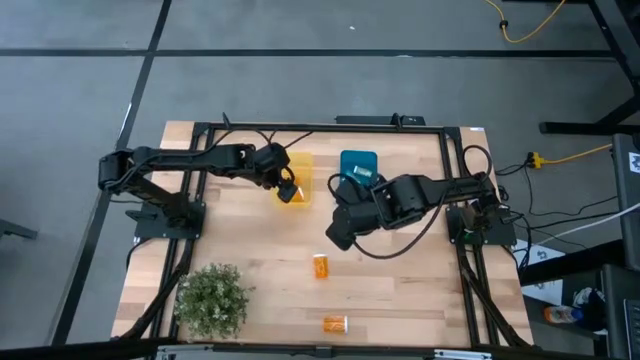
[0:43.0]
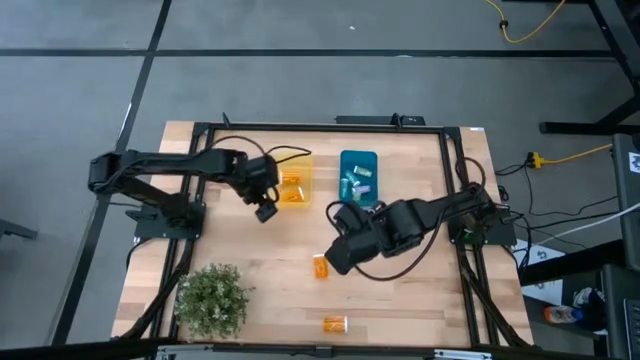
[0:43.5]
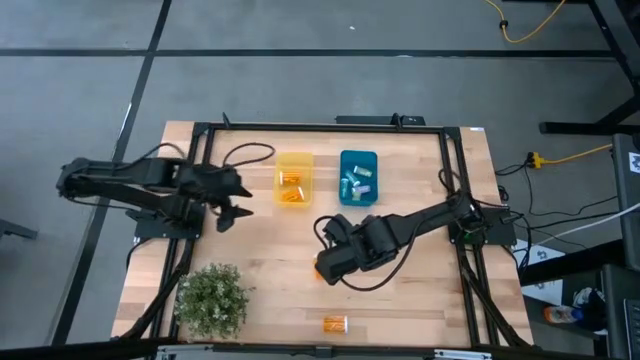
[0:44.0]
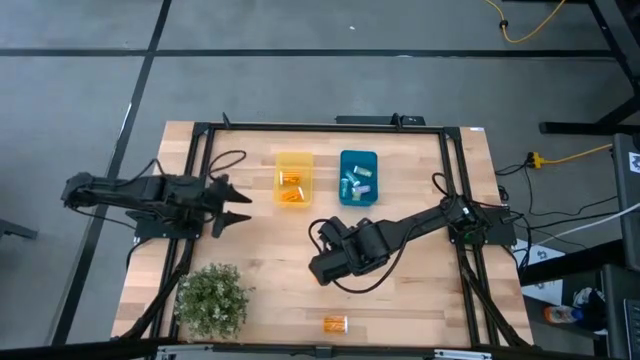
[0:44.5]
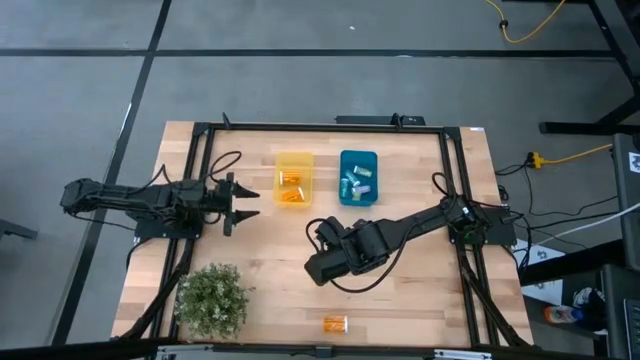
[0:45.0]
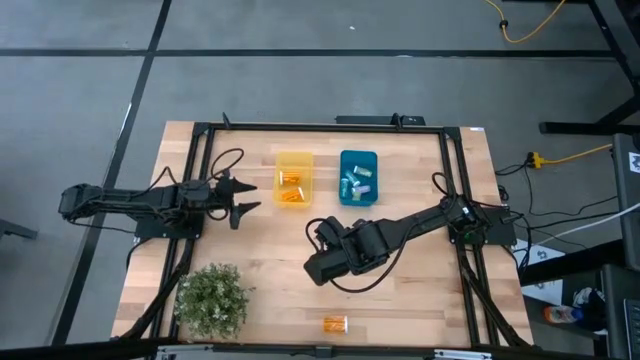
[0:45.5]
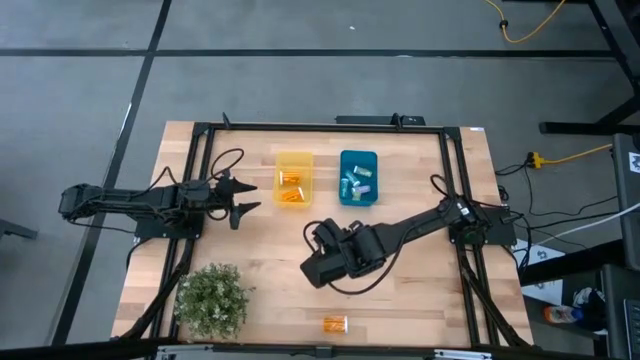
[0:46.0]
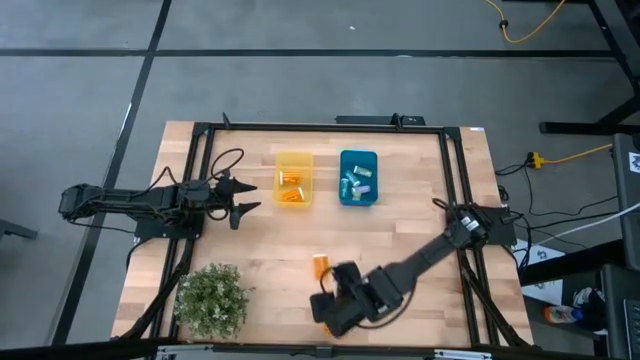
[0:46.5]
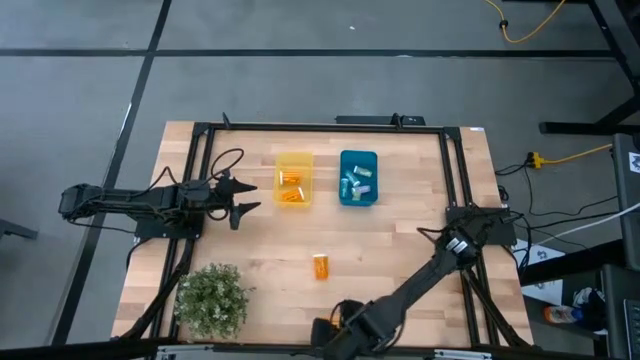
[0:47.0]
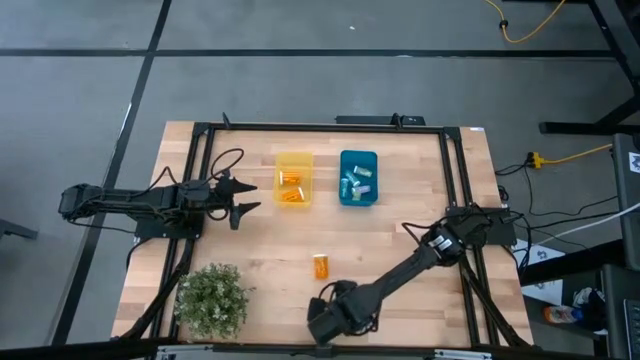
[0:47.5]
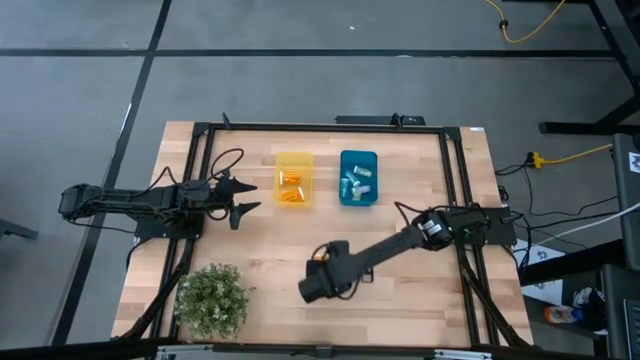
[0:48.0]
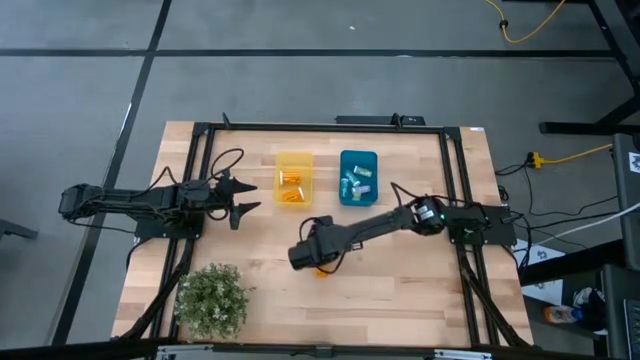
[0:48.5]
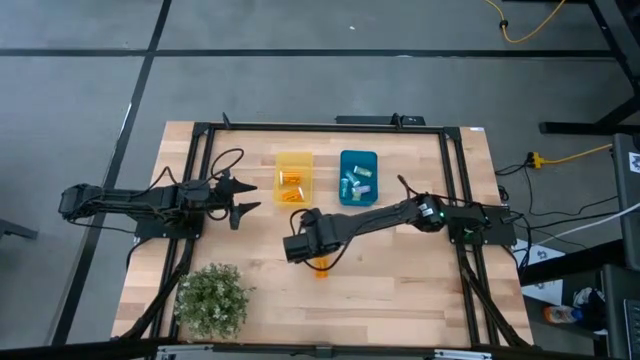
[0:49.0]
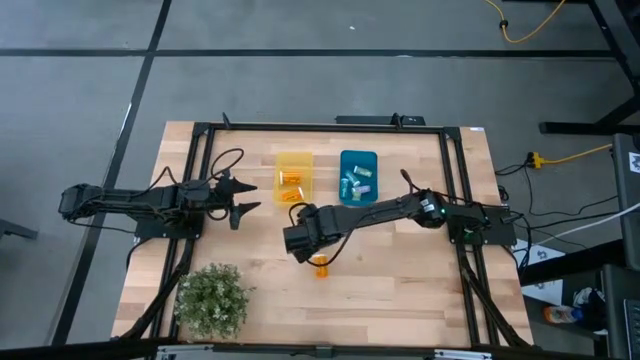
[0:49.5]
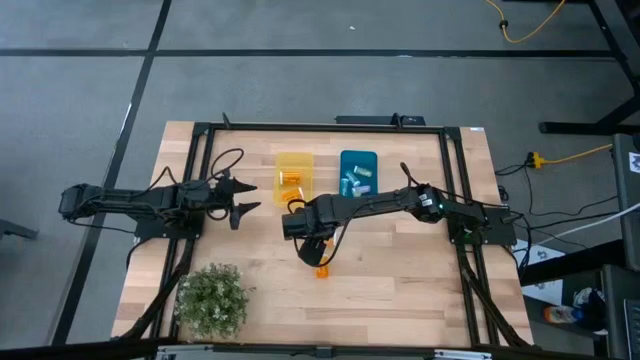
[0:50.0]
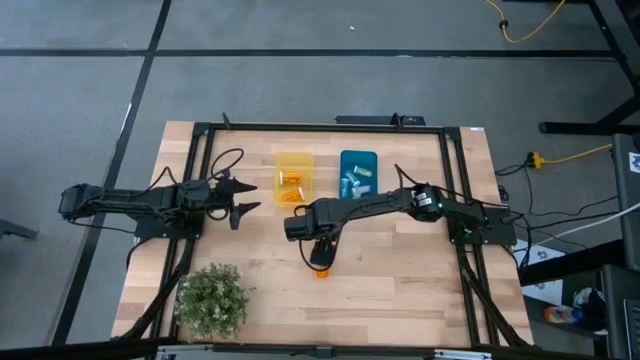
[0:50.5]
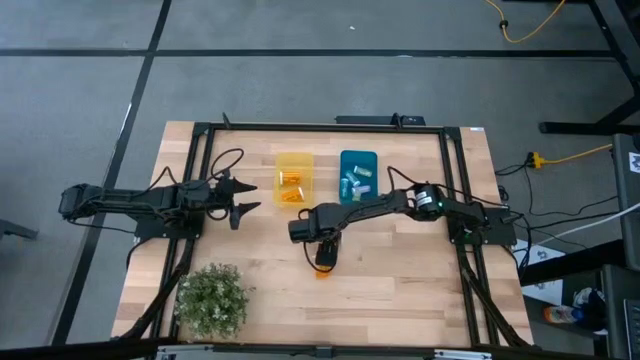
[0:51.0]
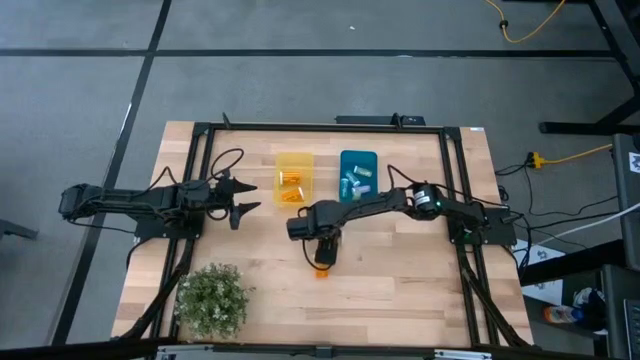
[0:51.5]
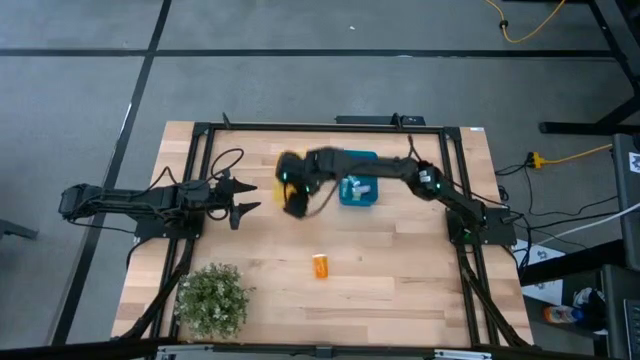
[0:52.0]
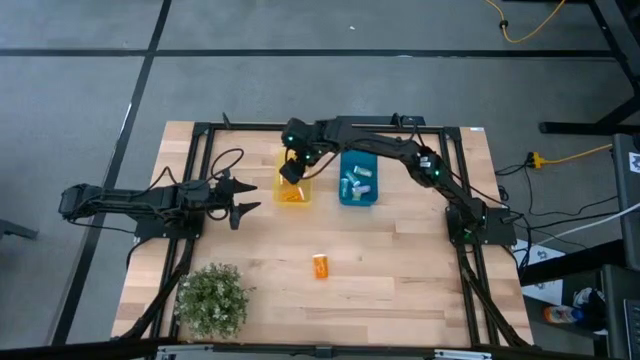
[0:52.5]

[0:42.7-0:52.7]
Task: Pick and place medicine bottles into bin by pill shape (circle, oval)
Put the orange pill bottle into the yellow bin

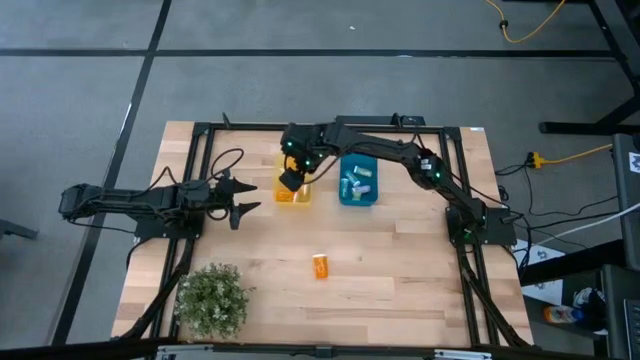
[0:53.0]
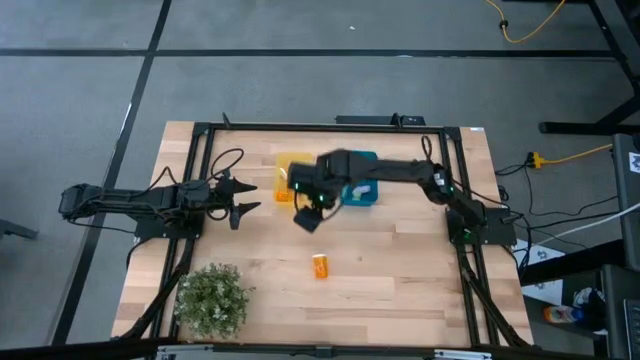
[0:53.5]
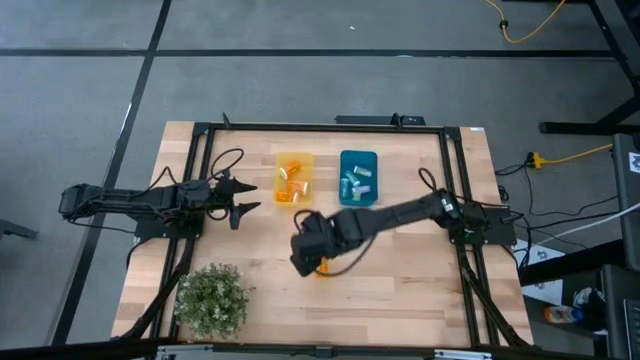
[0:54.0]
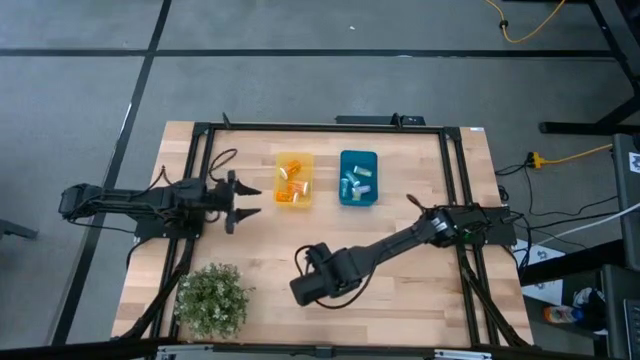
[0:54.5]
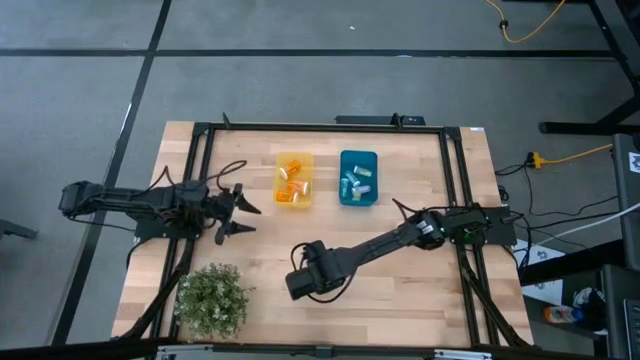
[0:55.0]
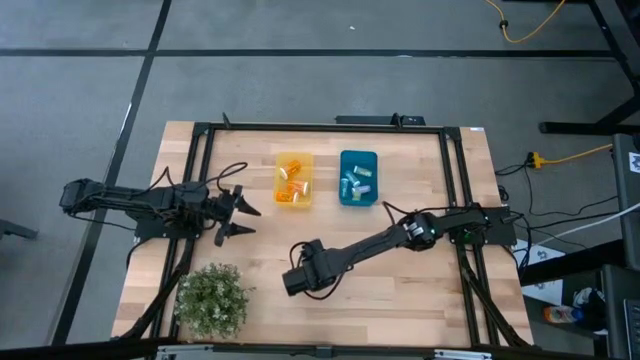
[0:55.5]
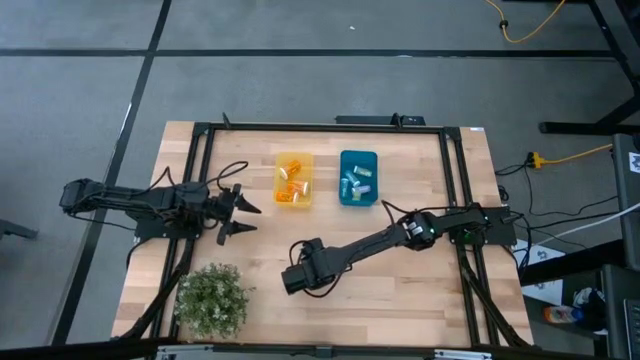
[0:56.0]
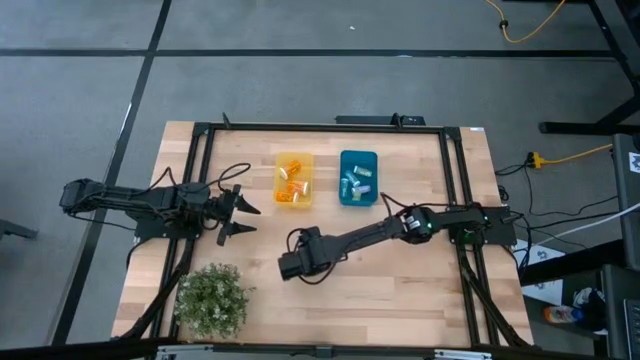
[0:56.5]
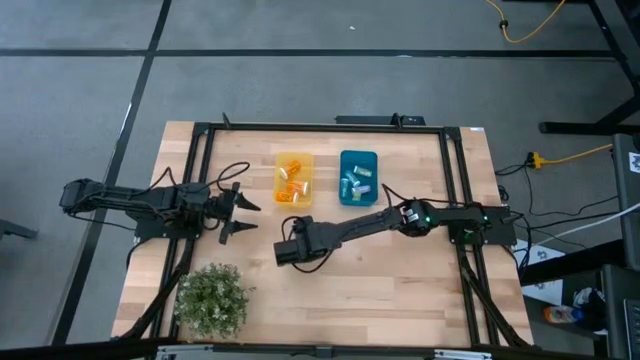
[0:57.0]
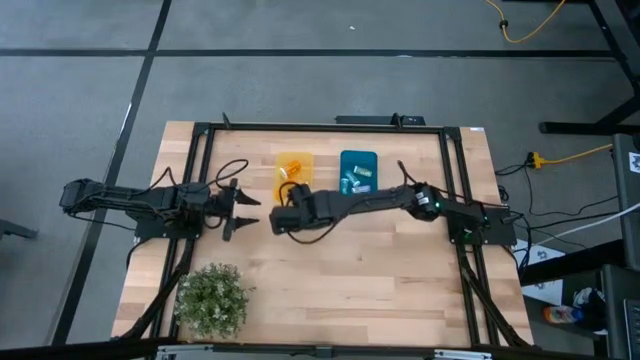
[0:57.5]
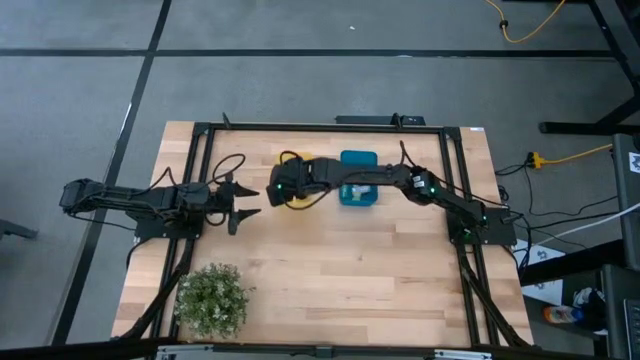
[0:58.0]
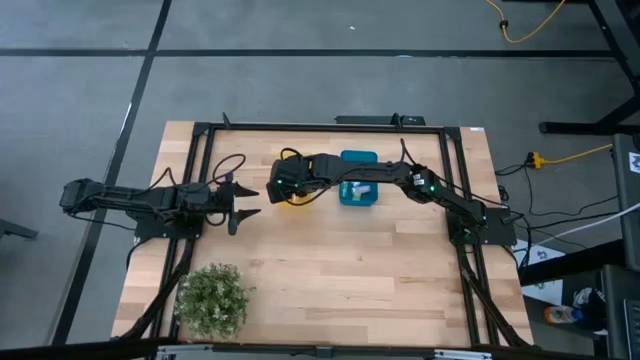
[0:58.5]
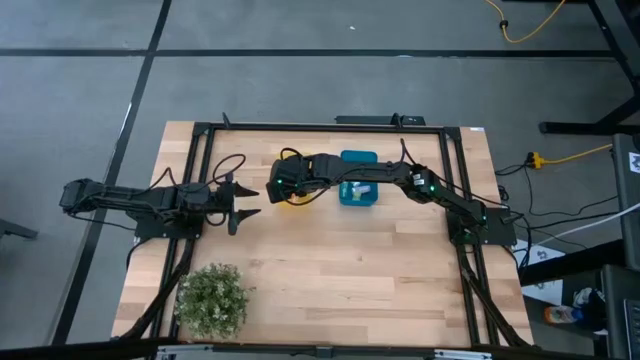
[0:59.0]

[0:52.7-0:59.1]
Put the orange pill bottle into the yellow bin

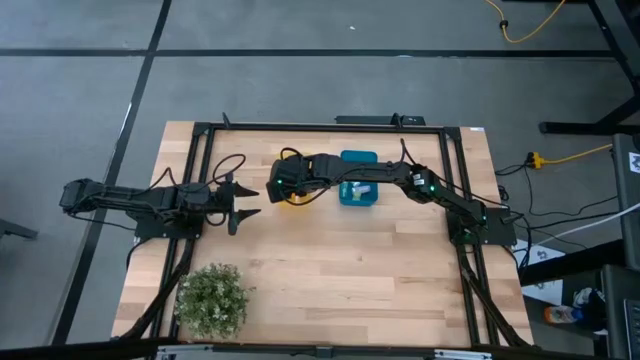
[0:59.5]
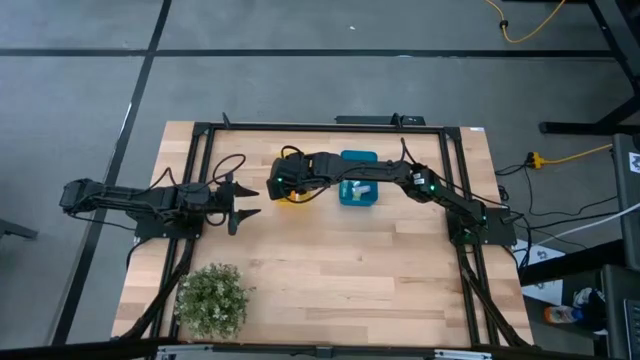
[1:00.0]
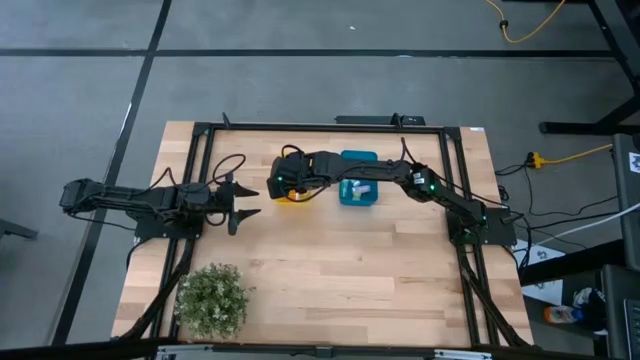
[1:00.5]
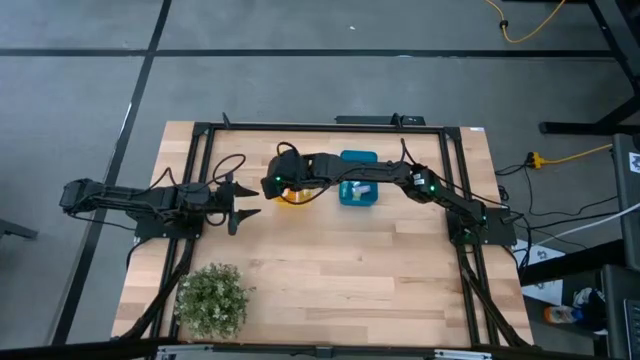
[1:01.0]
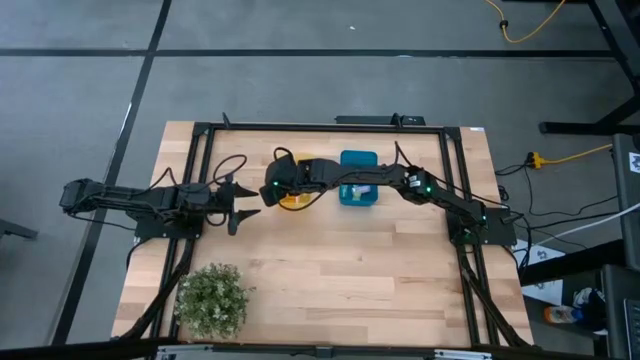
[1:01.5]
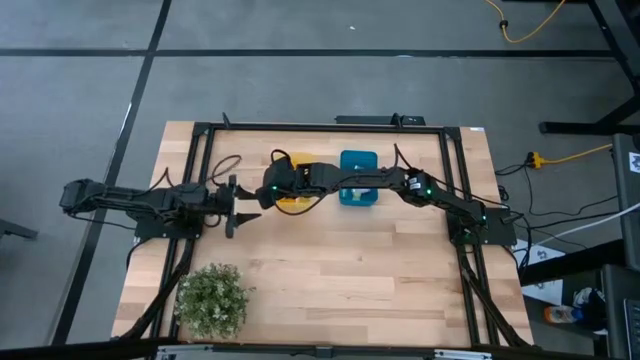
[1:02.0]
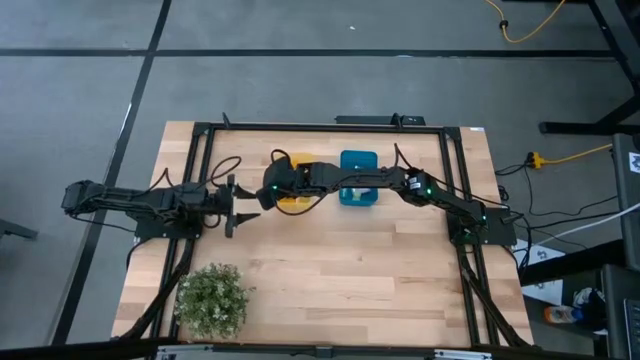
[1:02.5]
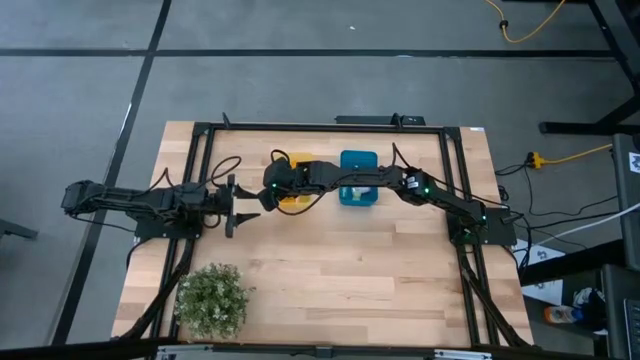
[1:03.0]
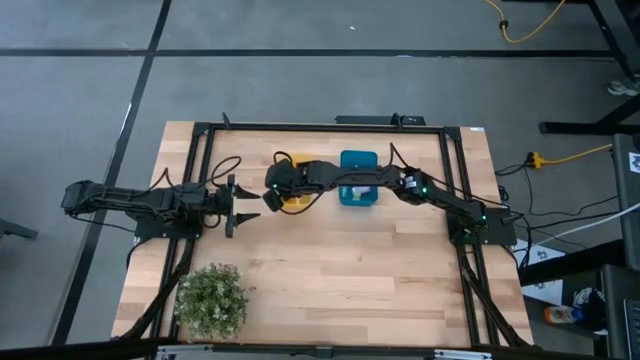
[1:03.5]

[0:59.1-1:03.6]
Adjust the orange pill bottle in the yellow bin

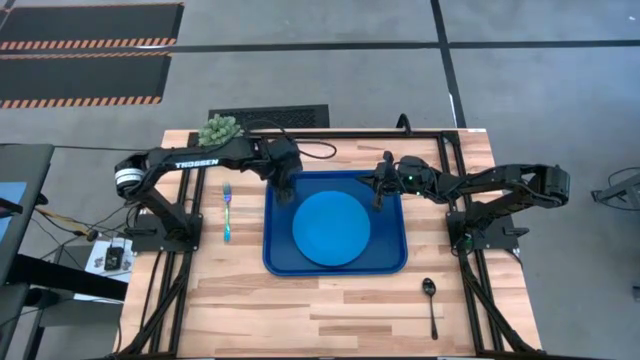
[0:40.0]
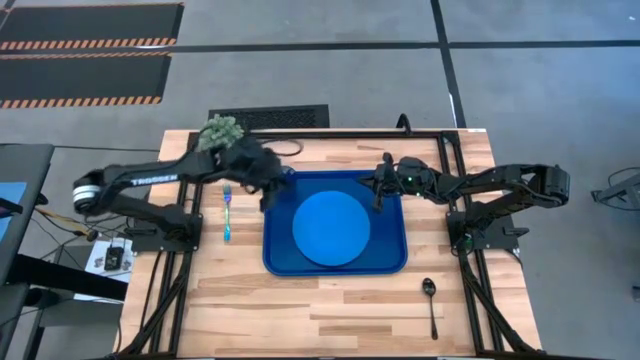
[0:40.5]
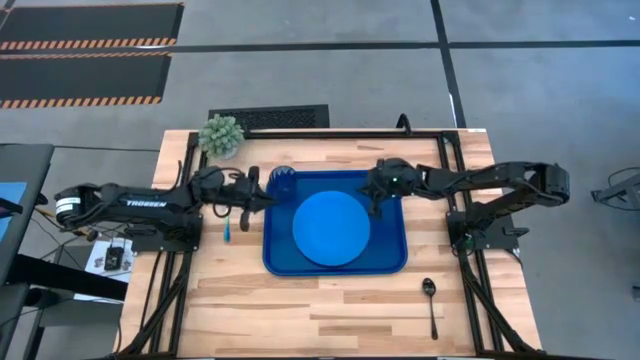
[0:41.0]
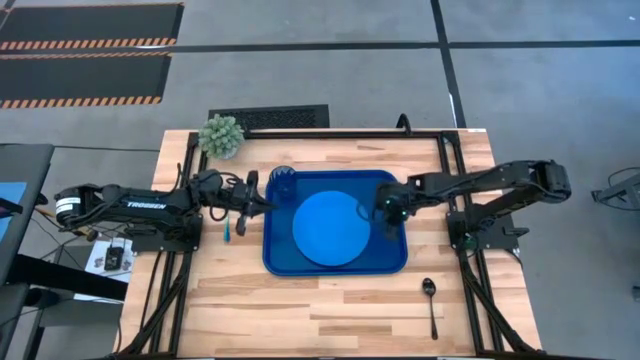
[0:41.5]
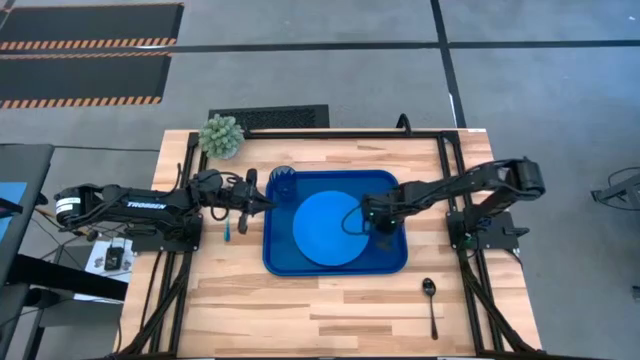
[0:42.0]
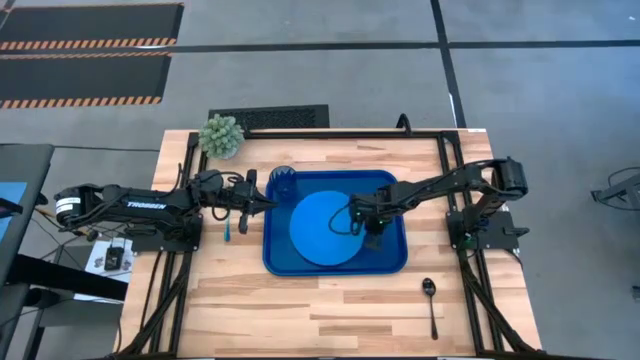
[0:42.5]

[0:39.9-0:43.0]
Task: Pick and place plate/cup/fork/spoon on tray
Adjust the light blue plate
